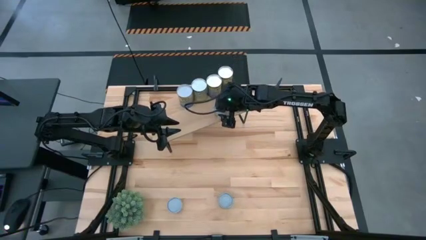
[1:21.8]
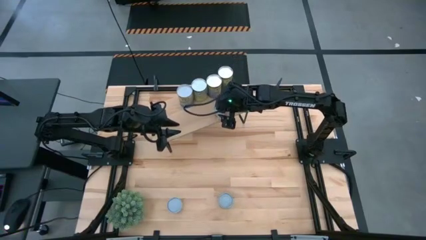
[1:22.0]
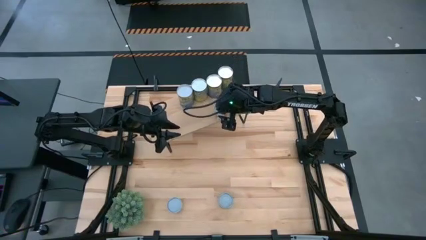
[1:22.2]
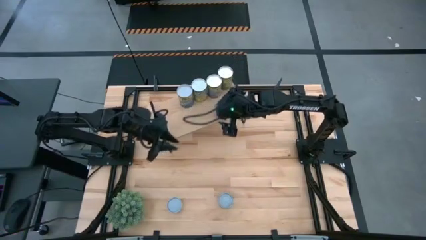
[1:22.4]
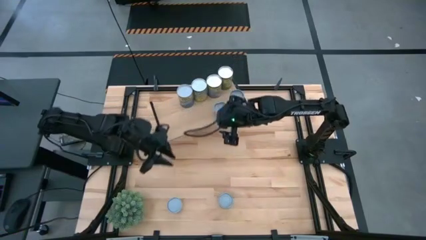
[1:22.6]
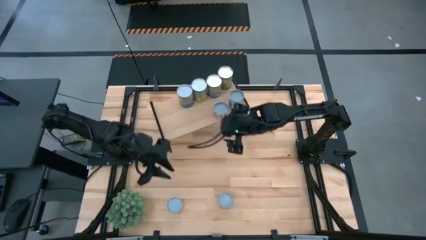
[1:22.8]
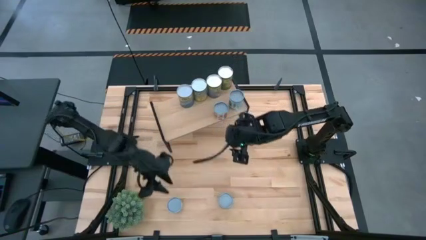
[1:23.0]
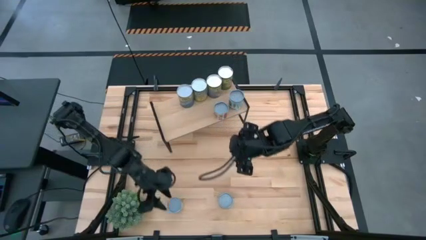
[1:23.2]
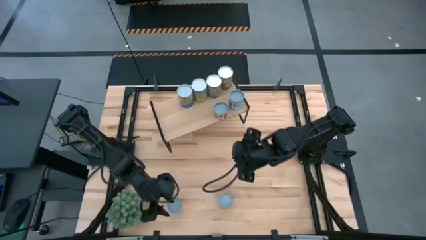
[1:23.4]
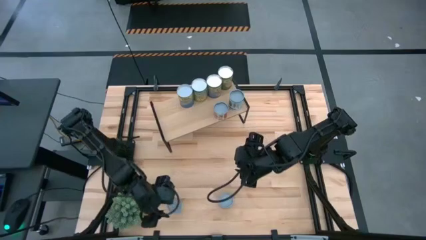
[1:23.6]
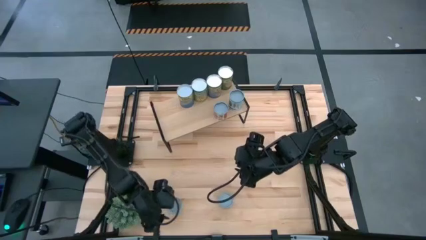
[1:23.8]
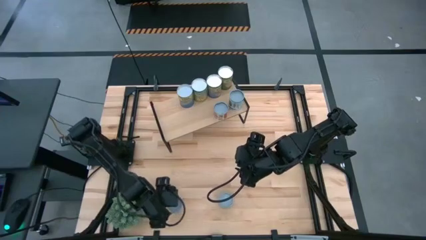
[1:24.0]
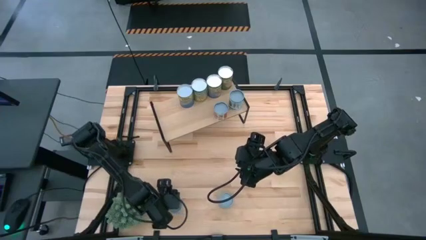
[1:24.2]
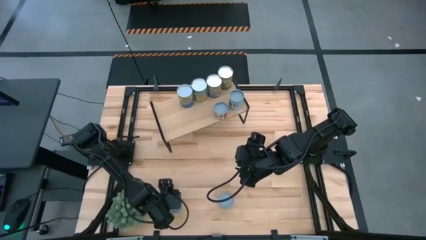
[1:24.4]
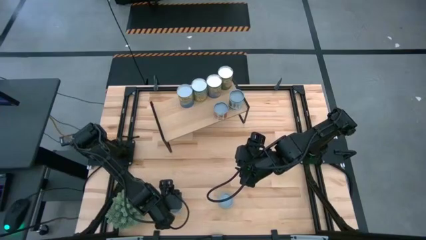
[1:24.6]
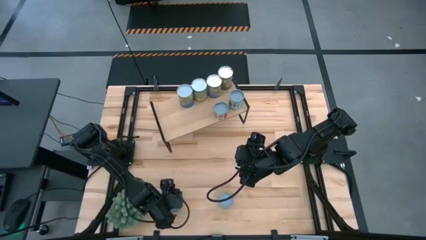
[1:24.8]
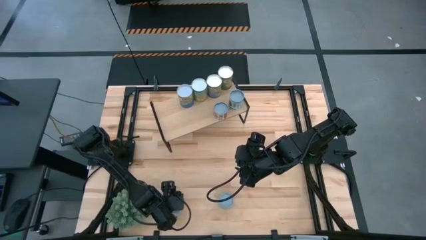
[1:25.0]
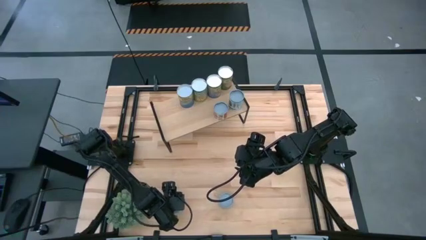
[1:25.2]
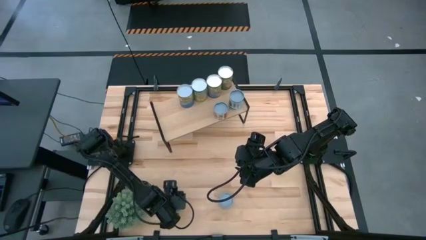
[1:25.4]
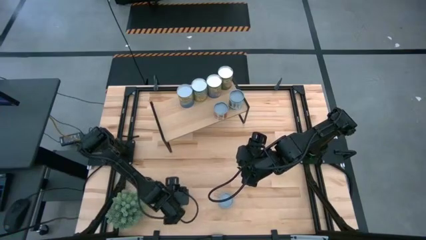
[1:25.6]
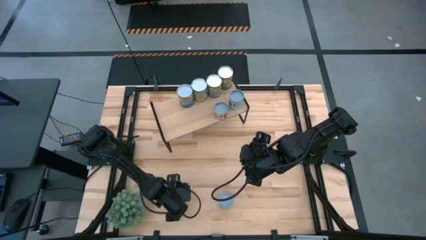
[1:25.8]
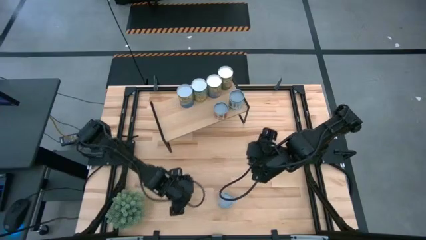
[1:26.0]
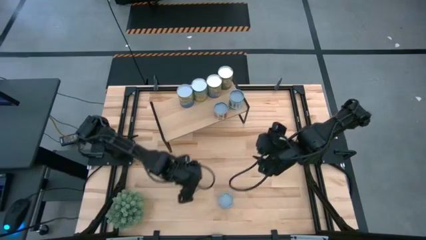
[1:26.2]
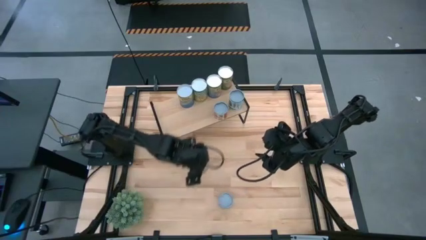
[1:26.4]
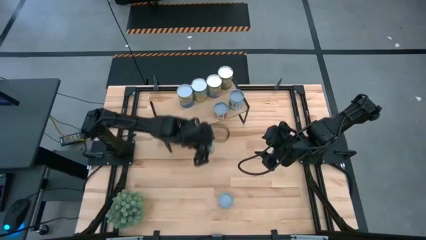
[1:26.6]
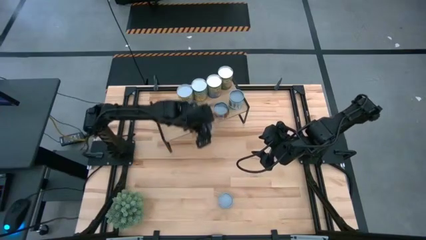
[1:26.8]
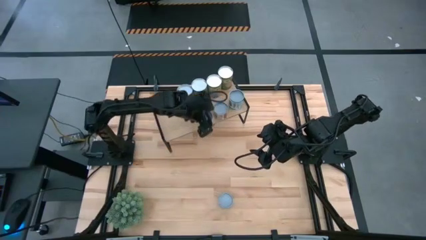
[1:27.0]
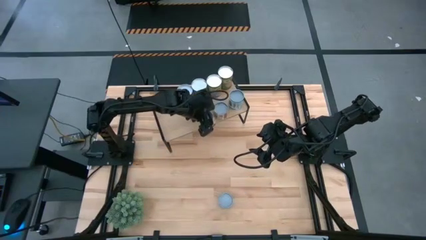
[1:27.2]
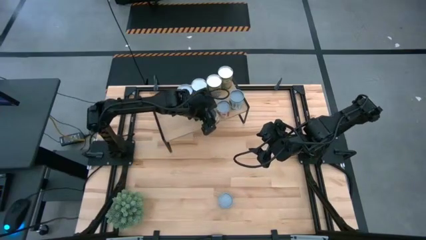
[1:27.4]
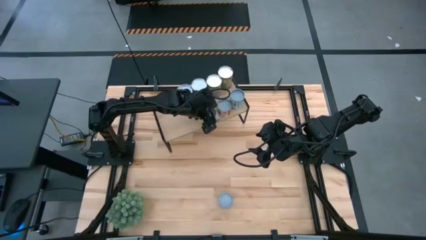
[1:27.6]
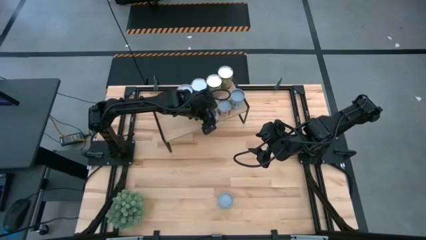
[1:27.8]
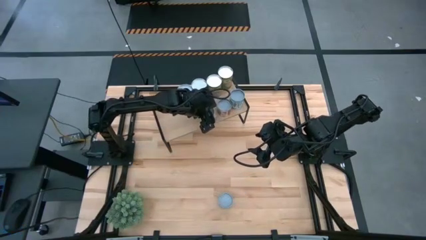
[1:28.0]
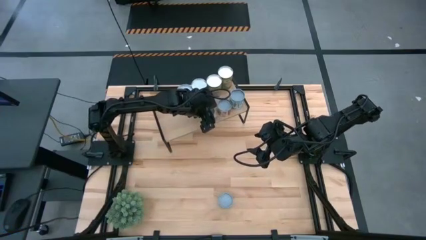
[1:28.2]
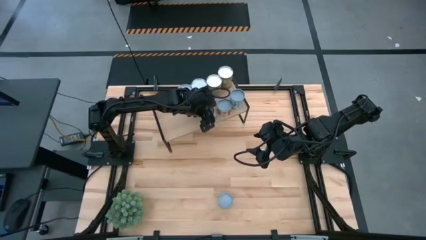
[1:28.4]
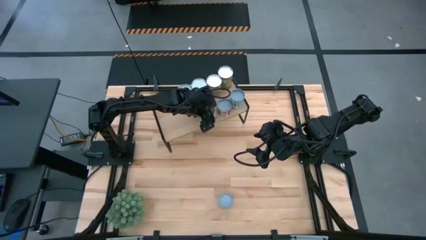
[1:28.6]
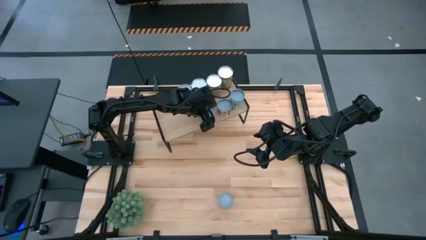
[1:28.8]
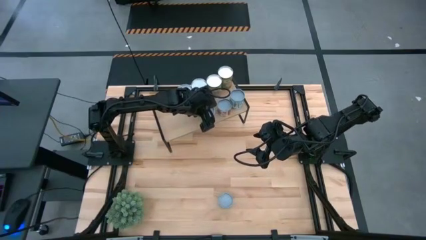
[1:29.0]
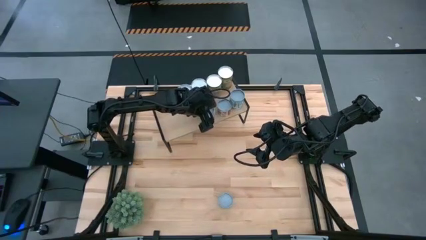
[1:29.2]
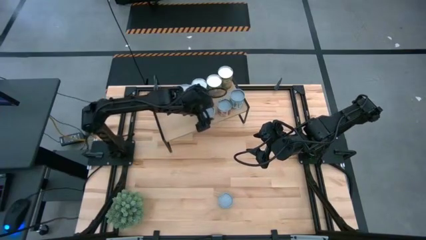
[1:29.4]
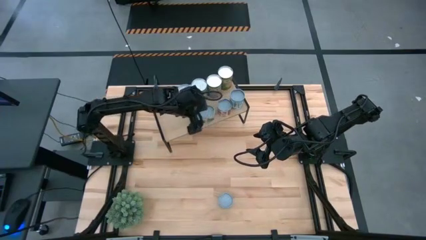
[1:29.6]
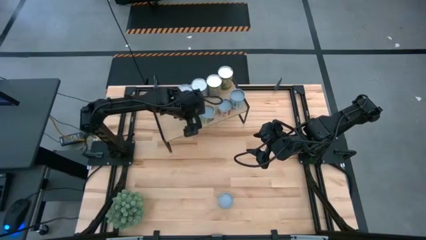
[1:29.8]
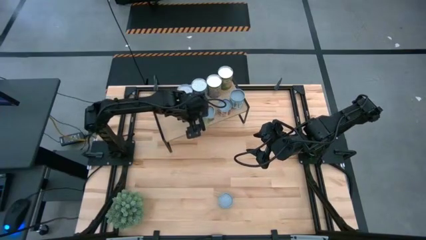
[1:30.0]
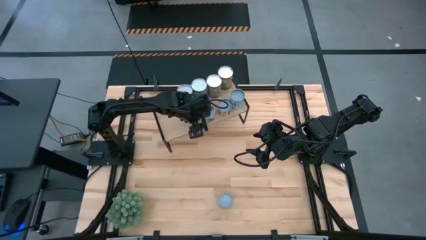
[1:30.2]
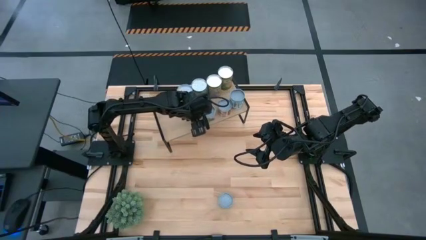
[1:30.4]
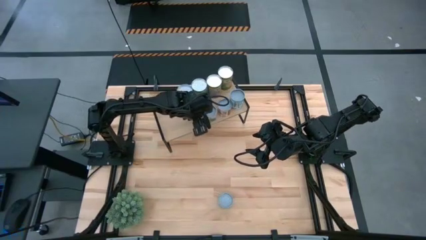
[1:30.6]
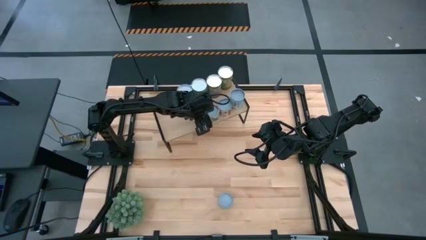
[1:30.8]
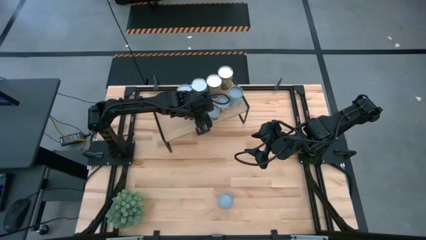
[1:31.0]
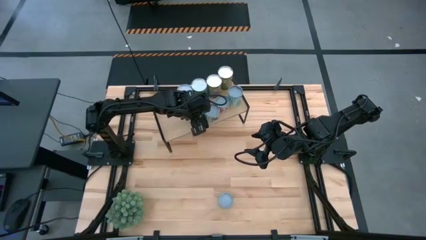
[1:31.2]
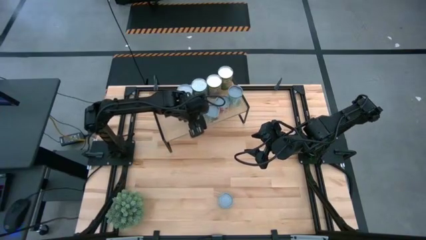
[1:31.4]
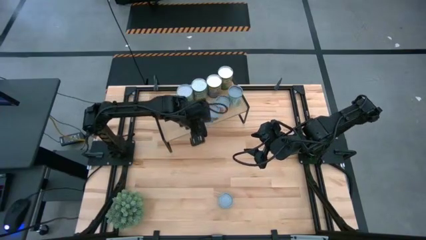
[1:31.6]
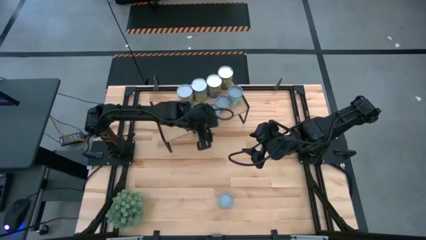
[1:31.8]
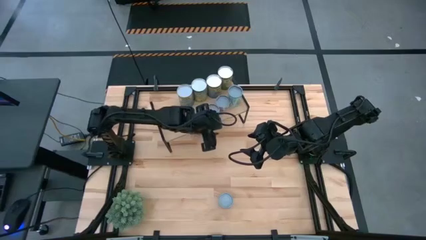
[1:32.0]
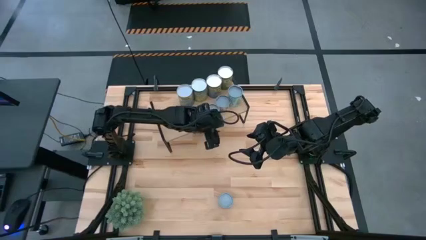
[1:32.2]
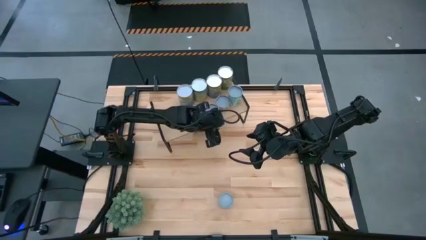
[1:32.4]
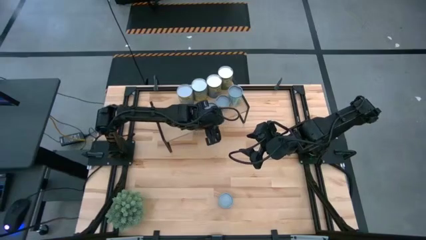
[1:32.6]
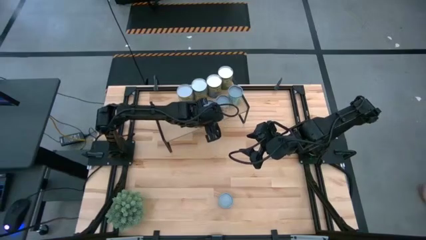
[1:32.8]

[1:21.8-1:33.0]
Task: Pick and place cans onto a shelf
Put the small canned peas on the shelf

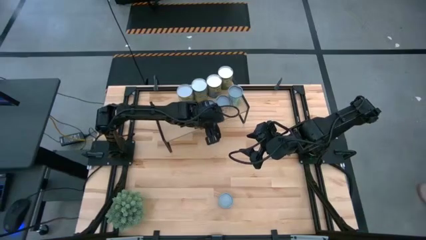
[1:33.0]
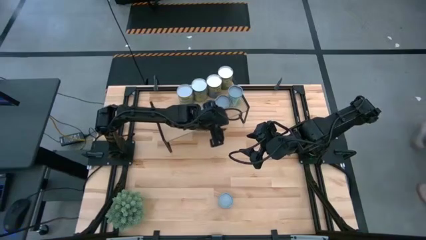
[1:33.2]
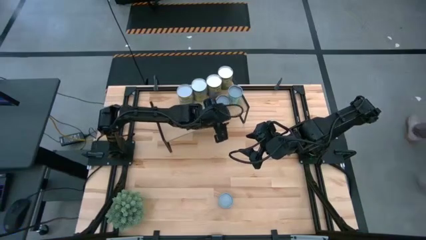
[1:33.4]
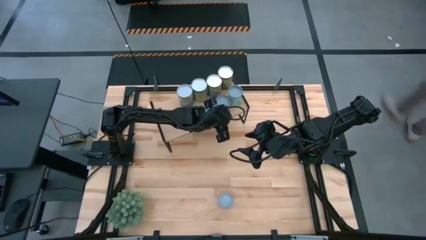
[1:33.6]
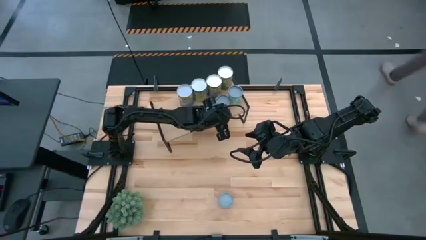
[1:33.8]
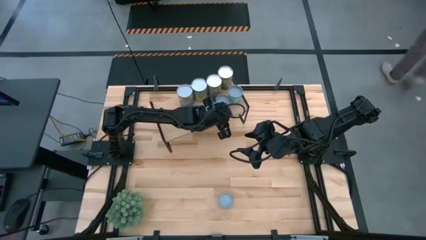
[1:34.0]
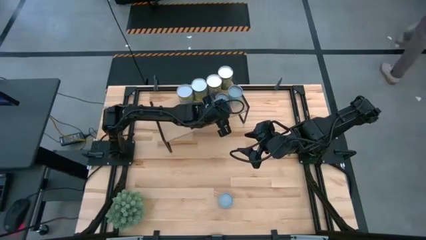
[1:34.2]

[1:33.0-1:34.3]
Adjust the canned diced tomatoes on the shelf

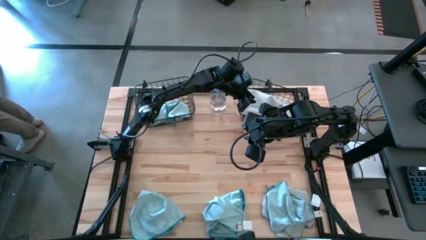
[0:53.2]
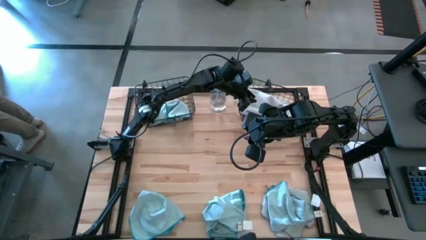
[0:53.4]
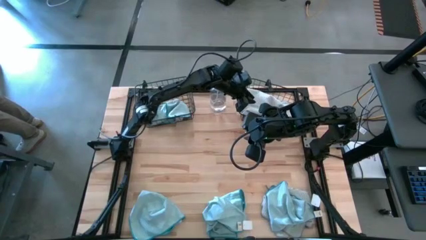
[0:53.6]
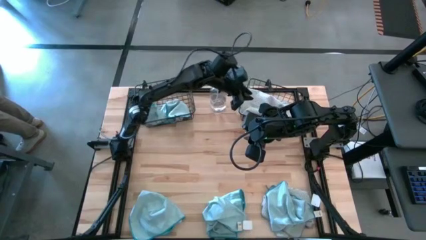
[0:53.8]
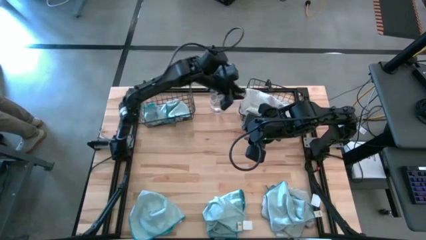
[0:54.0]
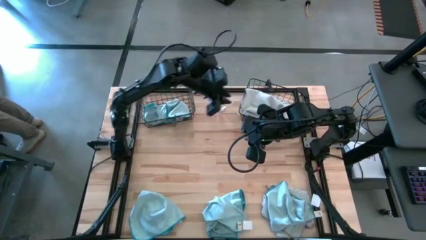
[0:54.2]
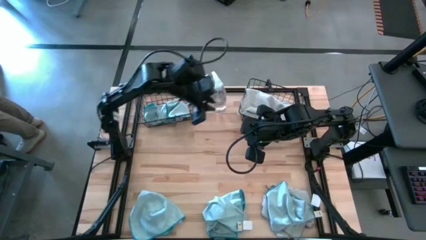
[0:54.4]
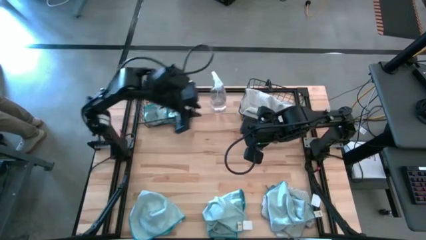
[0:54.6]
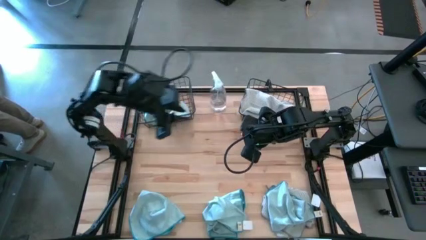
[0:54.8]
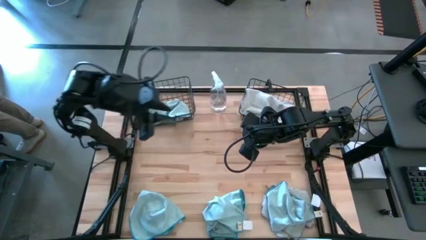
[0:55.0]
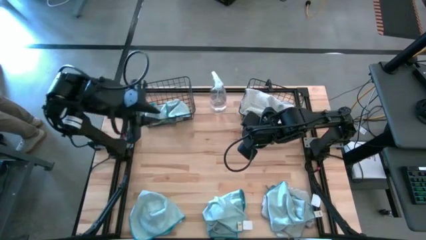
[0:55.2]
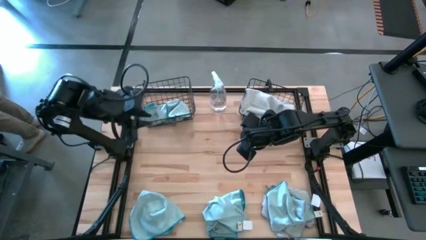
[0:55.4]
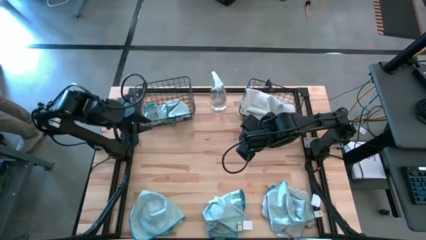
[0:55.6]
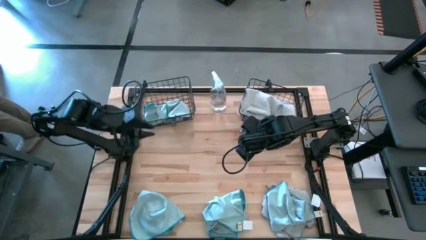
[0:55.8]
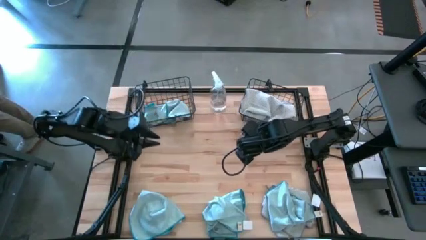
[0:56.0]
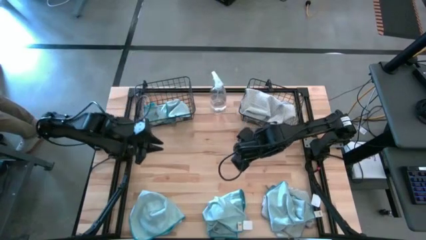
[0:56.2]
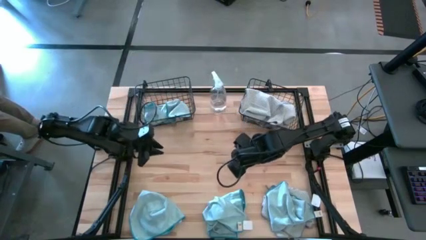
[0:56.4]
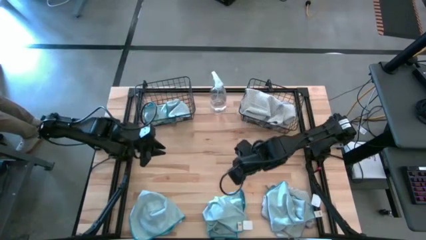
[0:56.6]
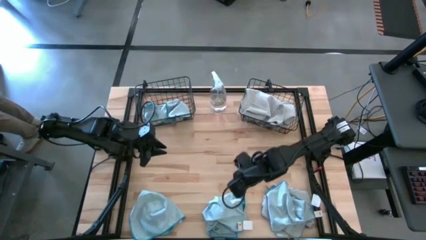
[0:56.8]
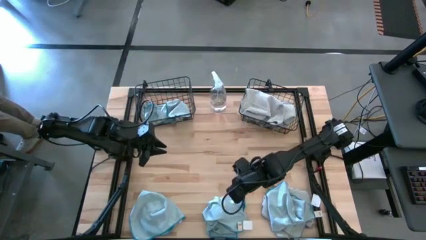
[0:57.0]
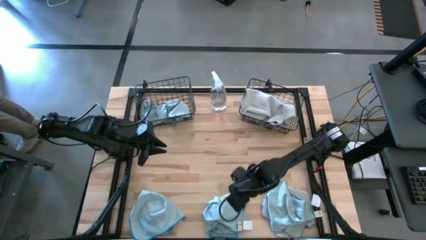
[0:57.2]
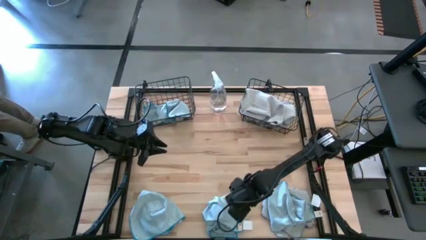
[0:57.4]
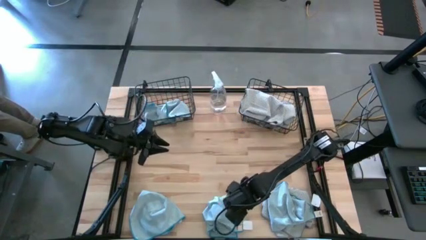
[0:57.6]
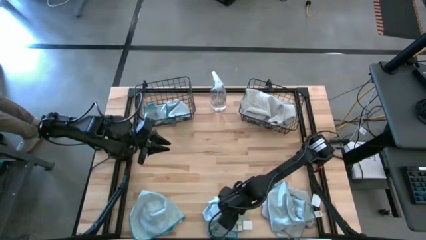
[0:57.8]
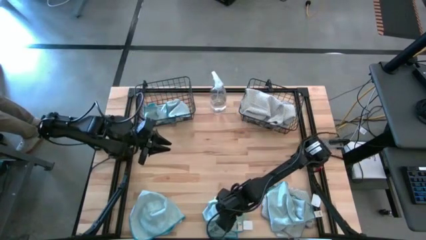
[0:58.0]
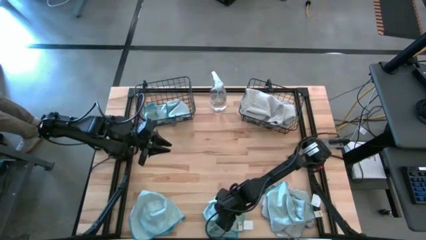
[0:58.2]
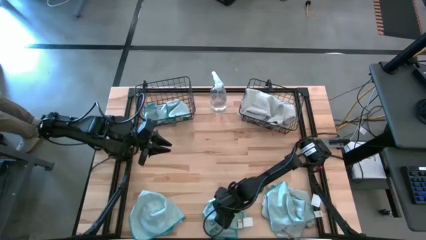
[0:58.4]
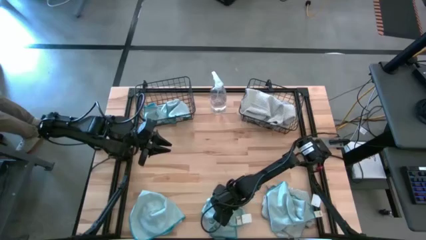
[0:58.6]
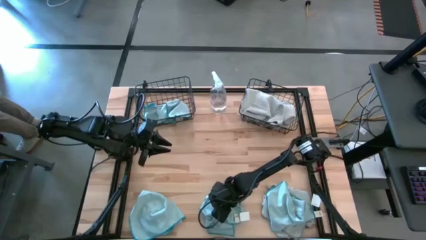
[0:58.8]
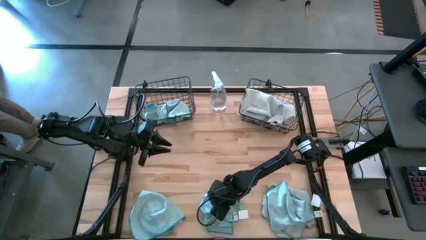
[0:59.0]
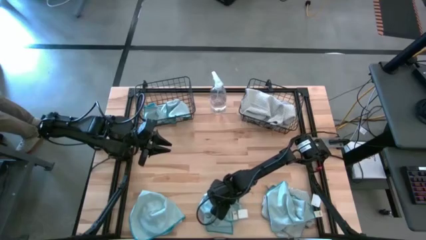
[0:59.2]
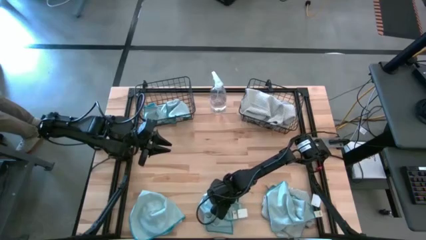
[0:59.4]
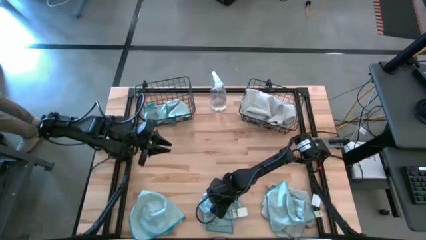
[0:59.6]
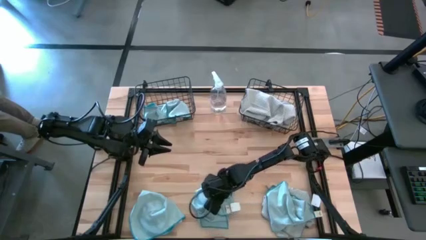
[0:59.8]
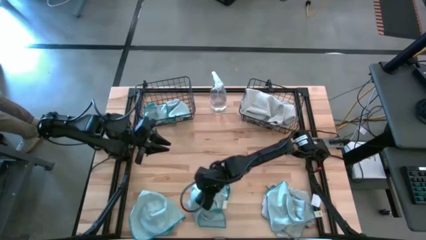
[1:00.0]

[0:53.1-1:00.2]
Task: Sort microfiber towel by color & place in baskets
Put the blue microfiber towel into the left black wire basket
